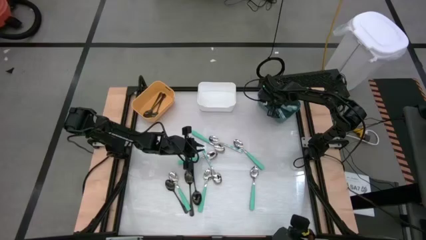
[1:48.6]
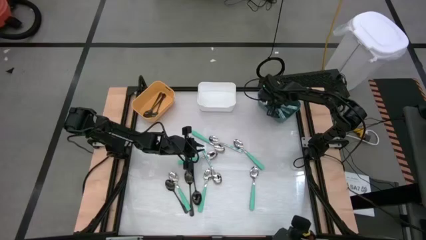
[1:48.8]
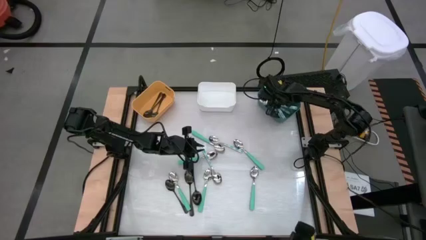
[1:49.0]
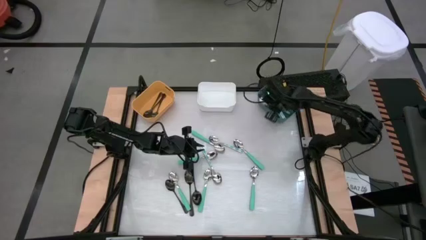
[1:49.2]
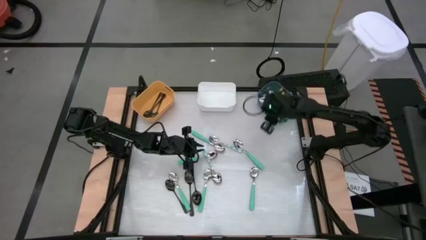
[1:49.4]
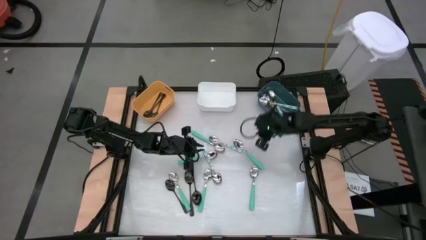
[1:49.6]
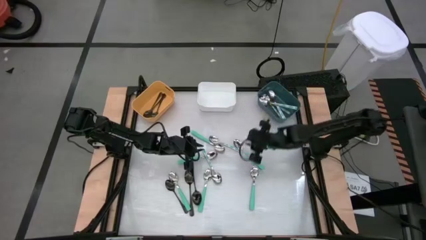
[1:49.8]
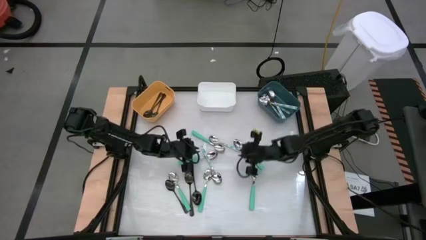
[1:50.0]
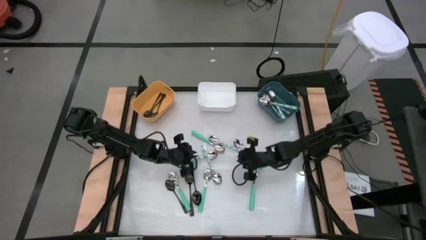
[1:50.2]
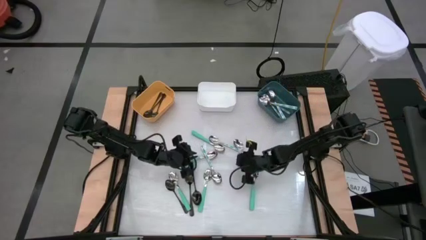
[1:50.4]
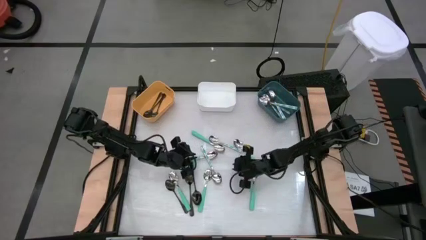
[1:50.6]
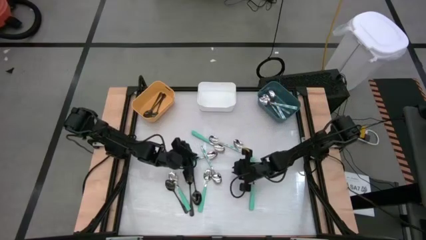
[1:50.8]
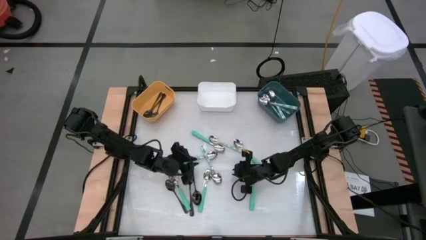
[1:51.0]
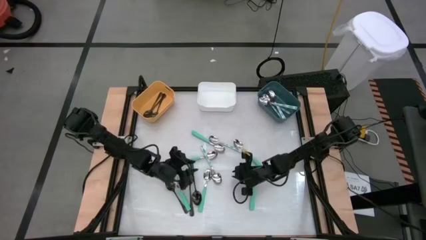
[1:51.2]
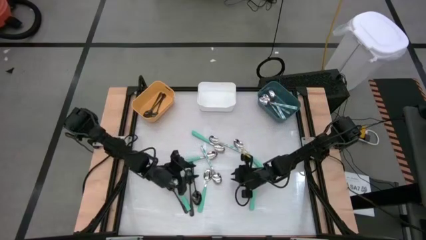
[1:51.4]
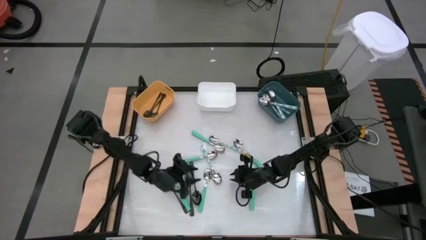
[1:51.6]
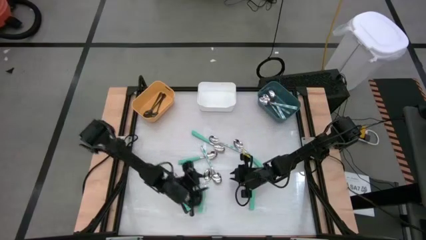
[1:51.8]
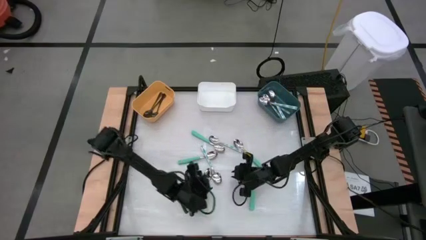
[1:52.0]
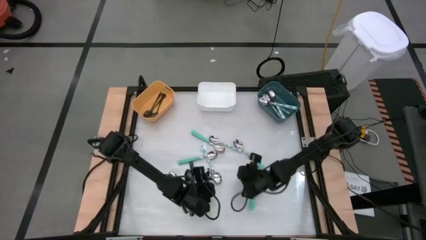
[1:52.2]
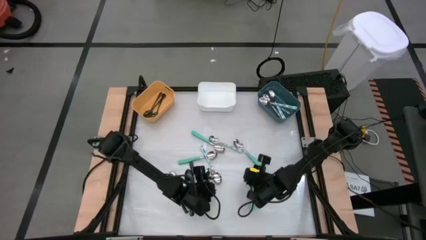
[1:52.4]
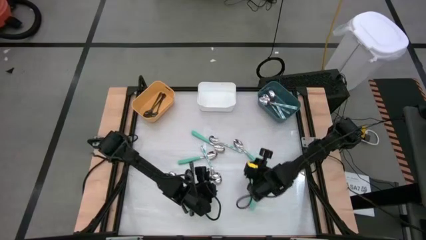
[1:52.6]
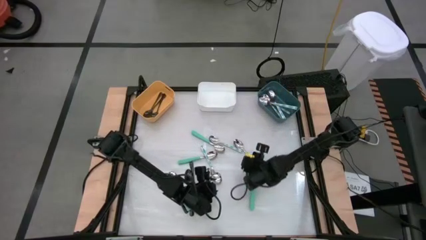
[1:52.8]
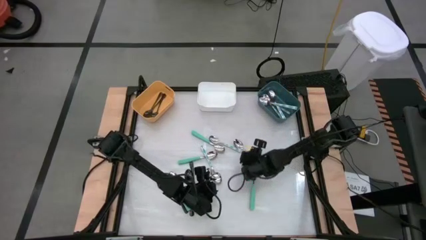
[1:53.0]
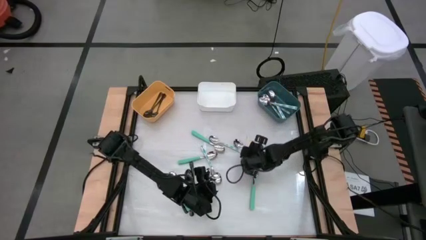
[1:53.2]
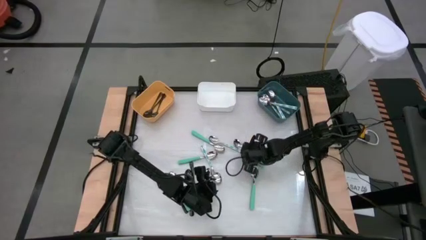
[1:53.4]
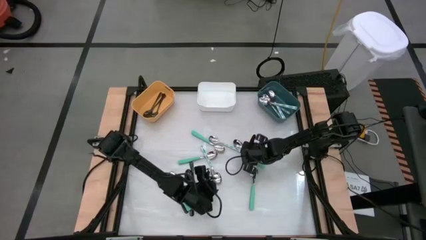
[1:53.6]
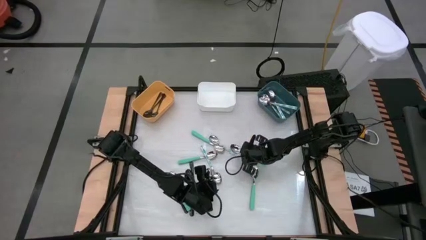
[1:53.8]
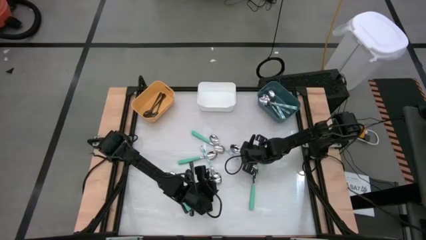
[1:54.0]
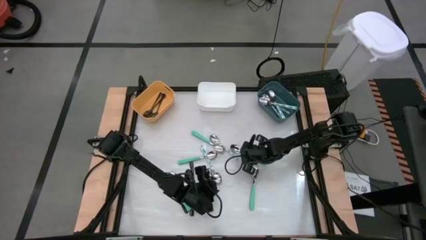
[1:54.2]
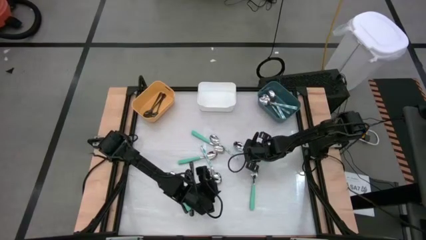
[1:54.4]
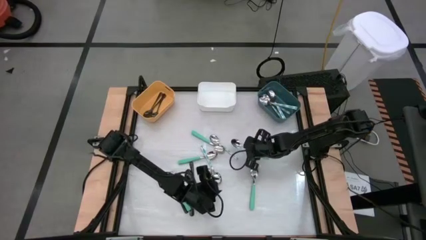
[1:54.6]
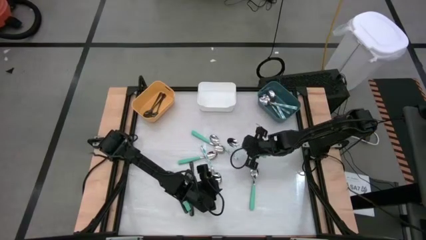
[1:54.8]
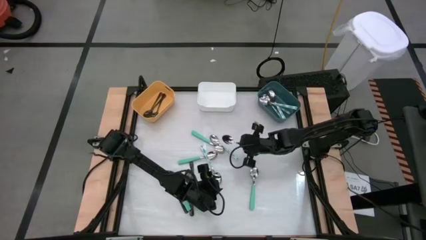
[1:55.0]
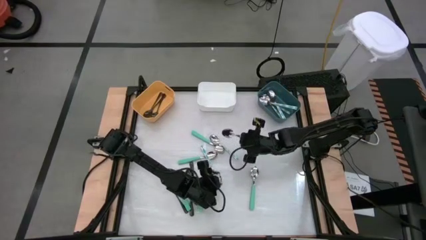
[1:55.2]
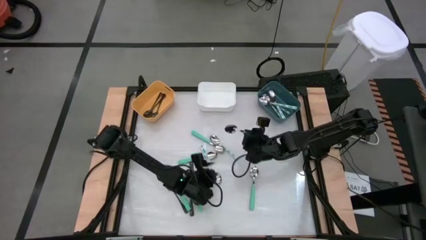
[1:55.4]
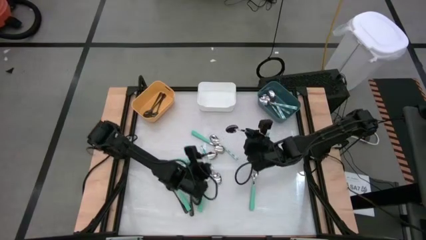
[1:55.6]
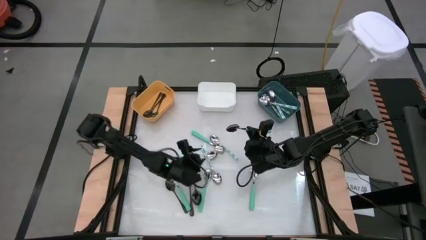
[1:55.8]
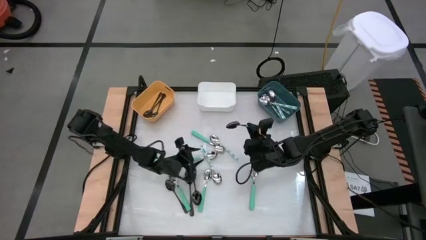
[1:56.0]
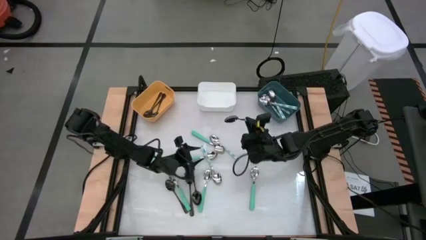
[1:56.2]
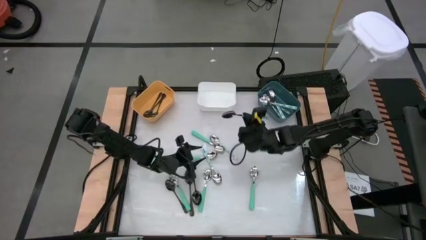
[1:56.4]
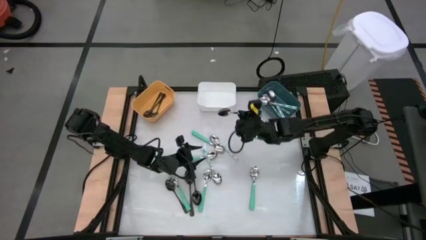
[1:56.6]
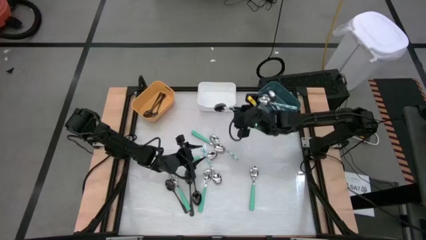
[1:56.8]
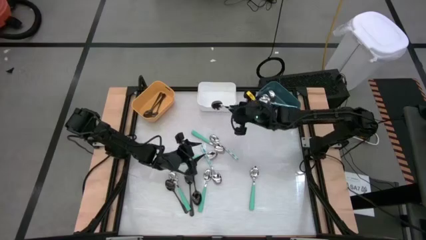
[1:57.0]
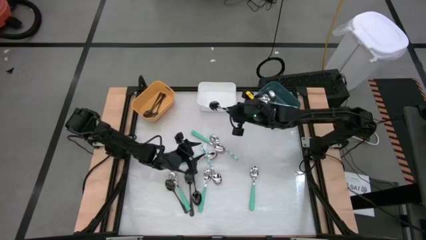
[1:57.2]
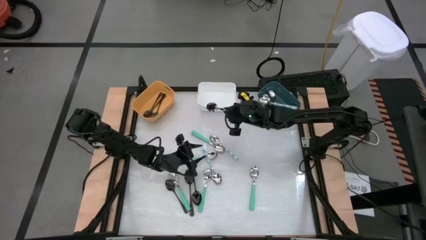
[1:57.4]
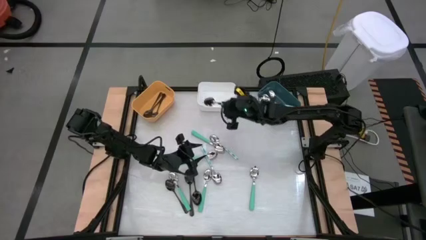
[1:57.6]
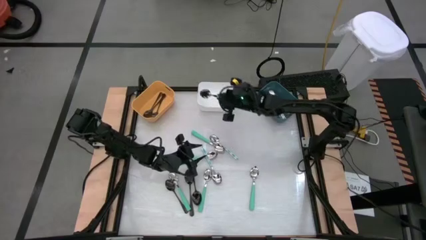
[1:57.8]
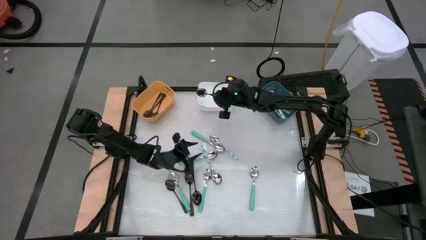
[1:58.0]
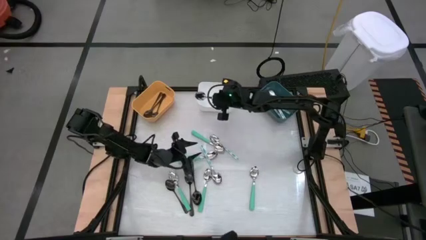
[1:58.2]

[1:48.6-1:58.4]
Task: Sort silverware by color (type)
Put the blue spoon into the white bin

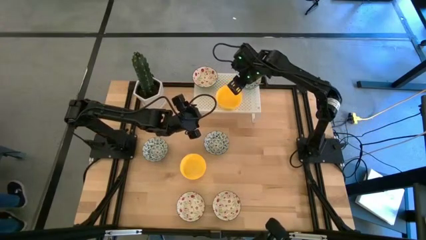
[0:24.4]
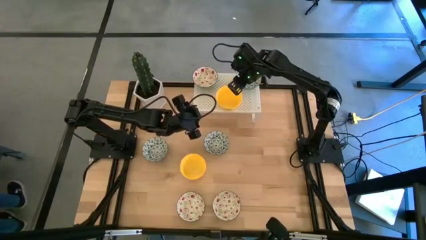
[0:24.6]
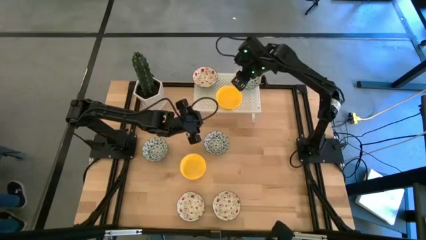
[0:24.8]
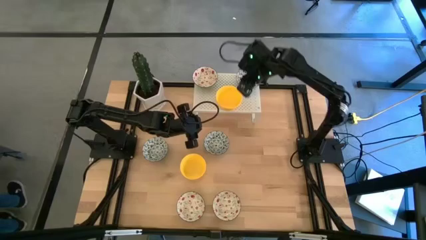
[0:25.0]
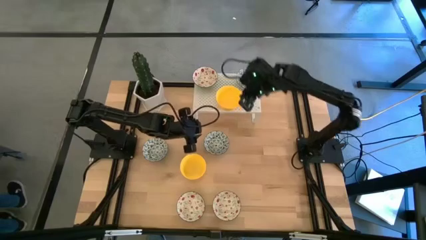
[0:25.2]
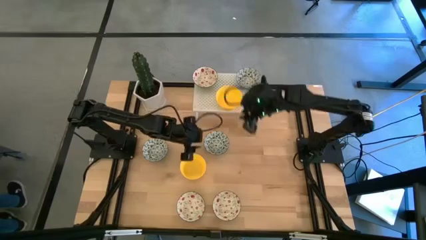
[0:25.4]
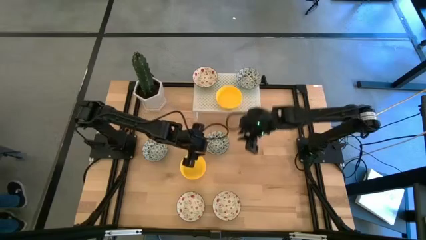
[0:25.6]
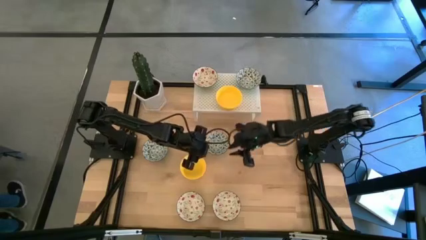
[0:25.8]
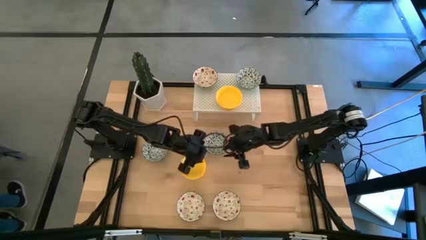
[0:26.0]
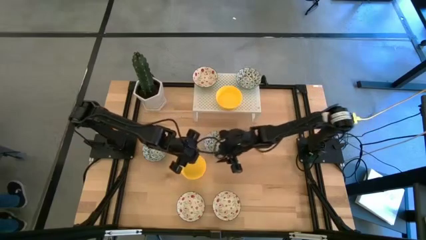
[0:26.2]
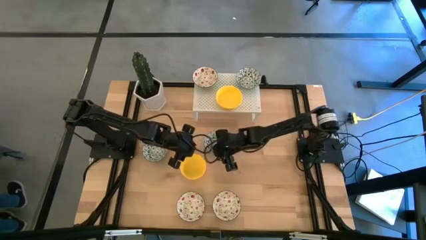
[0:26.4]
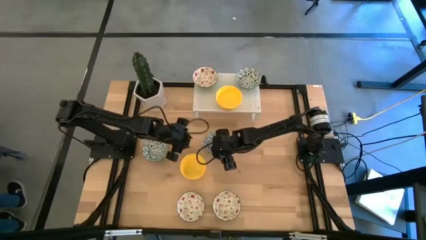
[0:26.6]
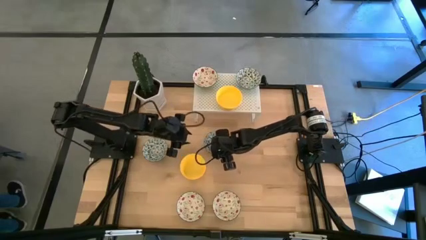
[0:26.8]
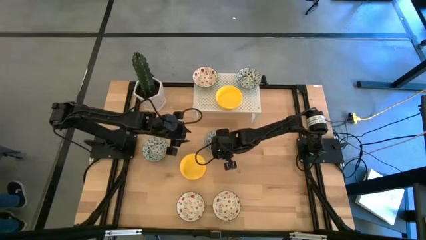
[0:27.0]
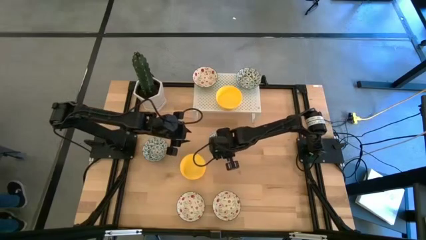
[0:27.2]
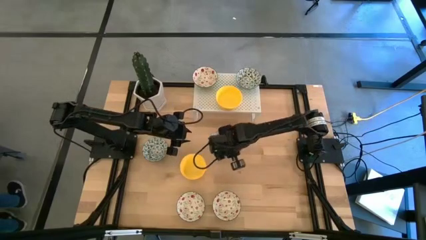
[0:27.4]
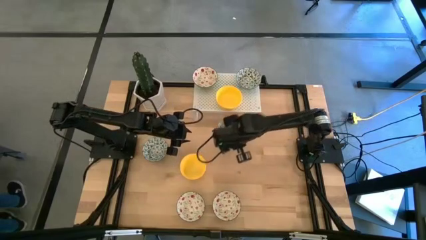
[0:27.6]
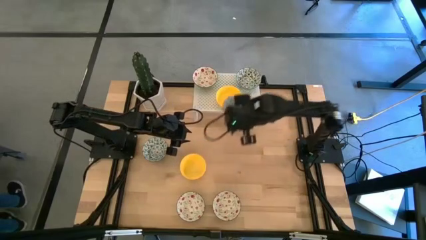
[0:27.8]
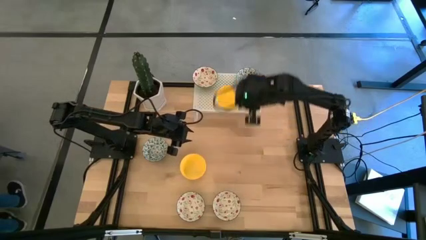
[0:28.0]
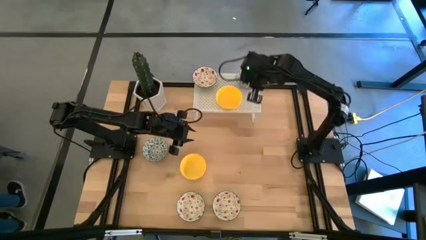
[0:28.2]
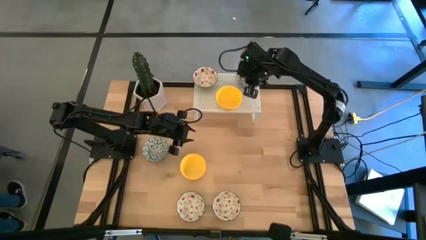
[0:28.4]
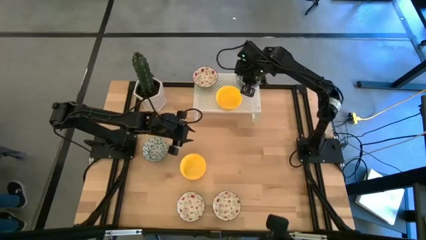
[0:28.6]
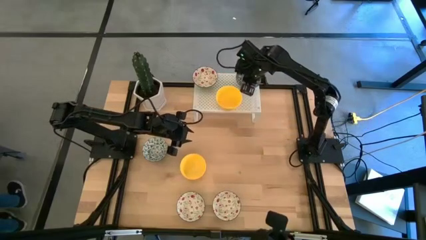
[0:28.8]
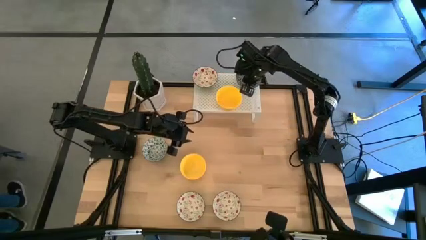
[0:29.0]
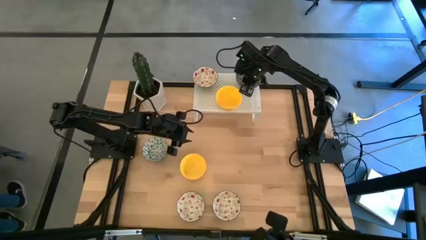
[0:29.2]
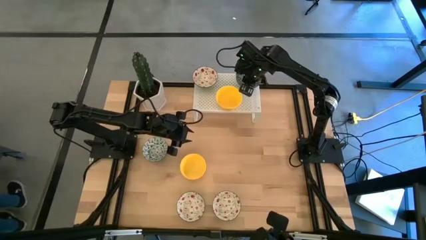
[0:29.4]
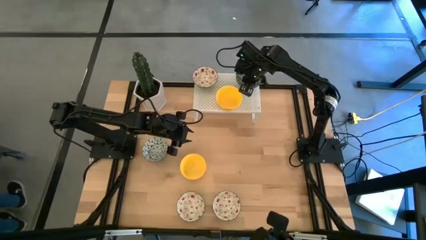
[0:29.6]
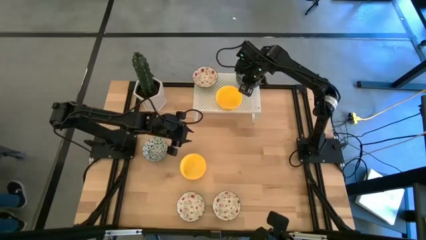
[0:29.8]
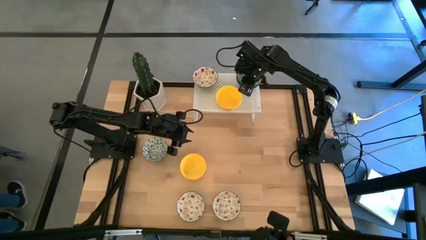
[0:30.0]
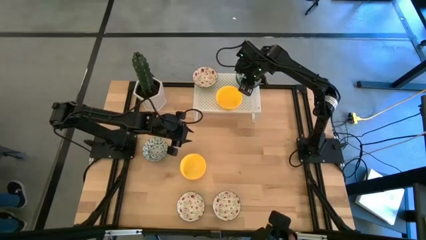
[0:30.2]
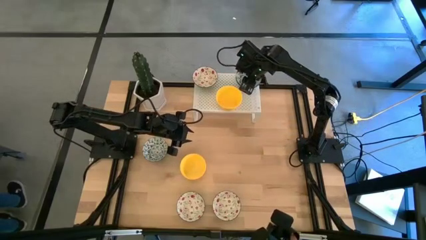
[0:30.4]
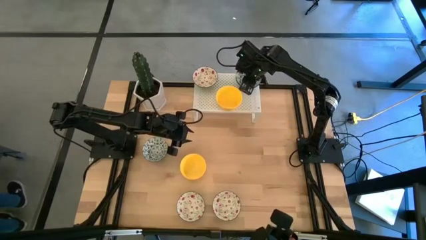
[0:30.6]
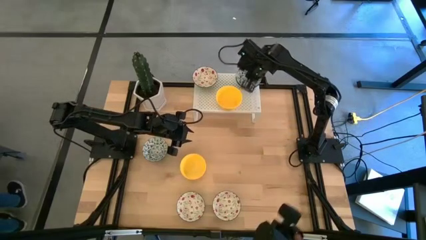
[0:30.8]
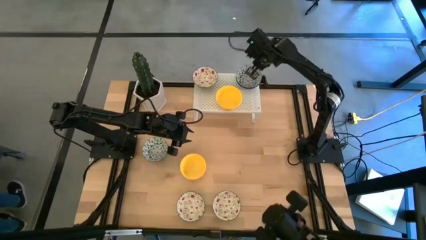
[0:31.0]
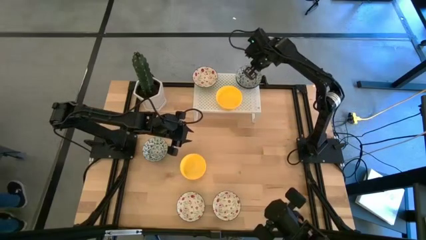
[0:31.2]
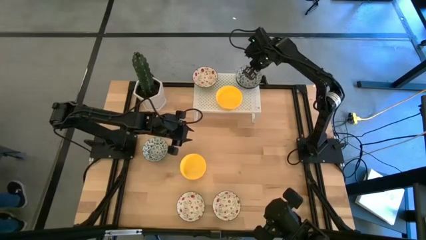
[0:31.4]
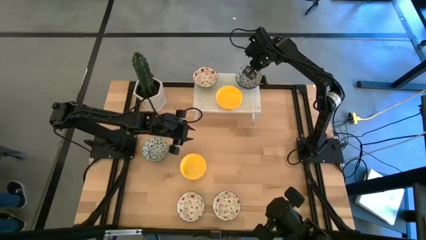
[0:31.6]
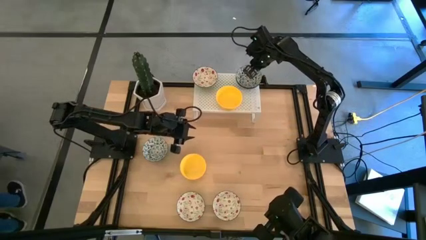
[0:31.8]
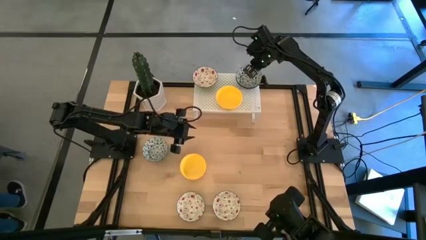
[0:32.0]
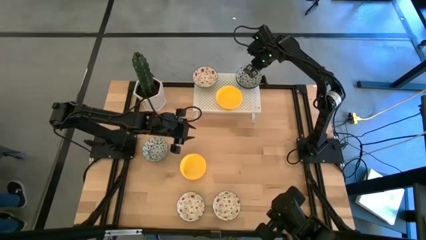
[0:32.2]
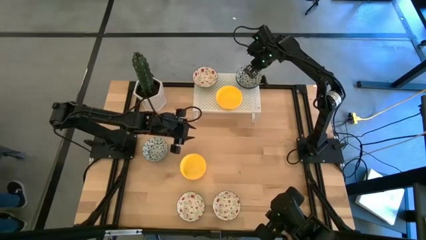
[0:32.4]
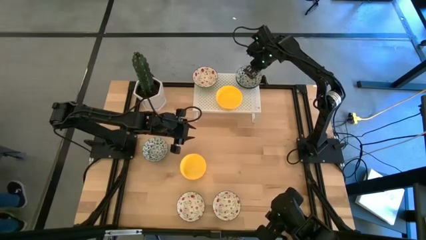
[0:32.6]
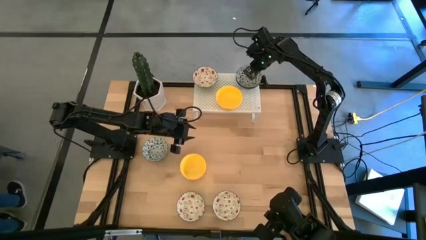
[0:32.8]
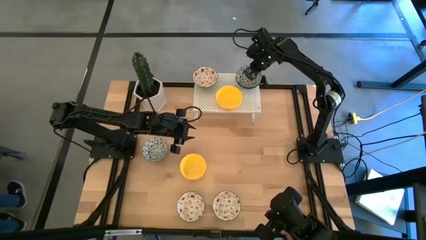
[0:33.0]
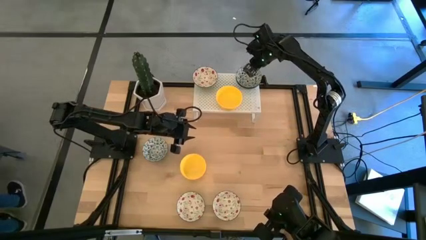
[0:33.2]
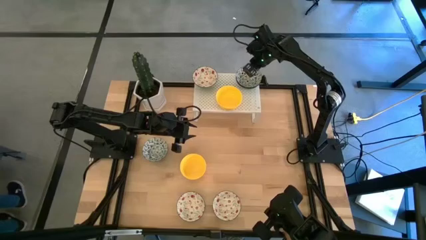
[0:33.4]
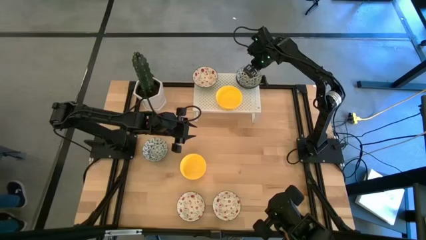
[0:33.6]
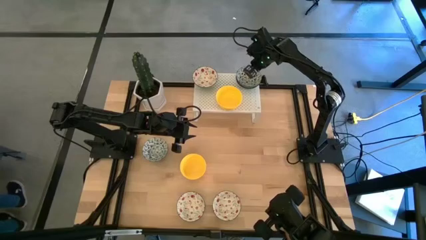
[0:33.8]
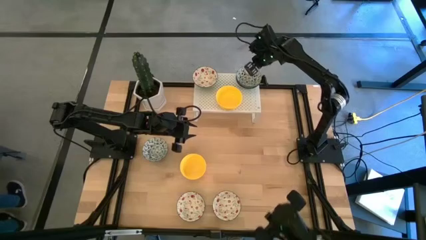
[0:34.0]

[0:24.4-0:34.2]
Task: Pick & Place Mini bowls
Stack the right blue patterned bowl on top of the other blue patterned bowl on the shelf
